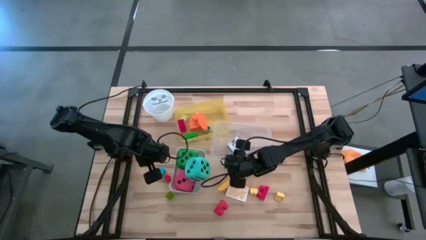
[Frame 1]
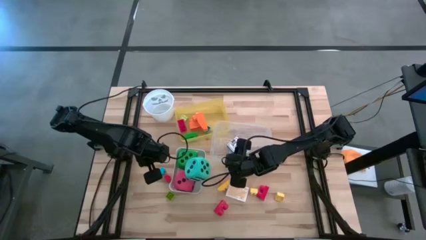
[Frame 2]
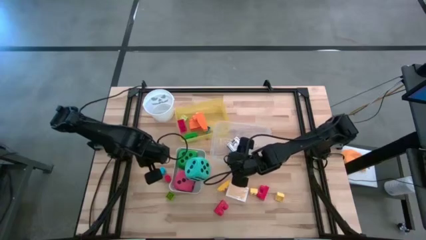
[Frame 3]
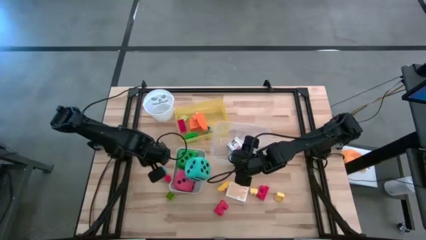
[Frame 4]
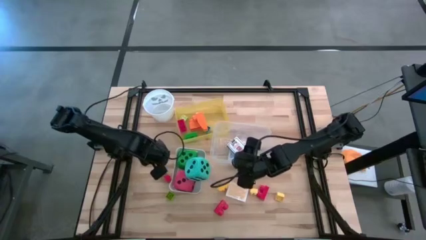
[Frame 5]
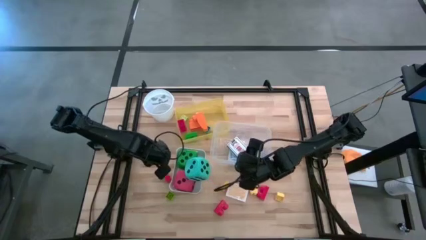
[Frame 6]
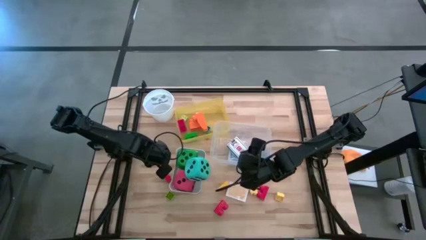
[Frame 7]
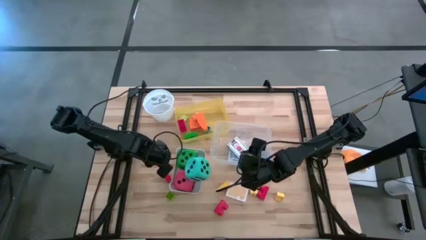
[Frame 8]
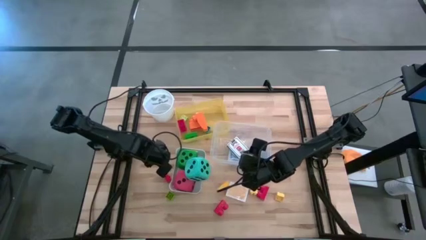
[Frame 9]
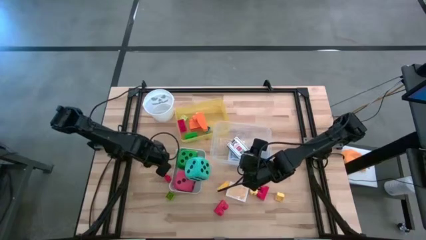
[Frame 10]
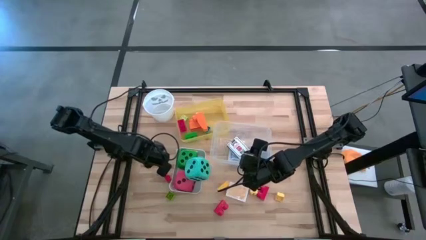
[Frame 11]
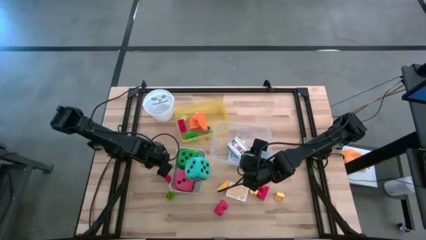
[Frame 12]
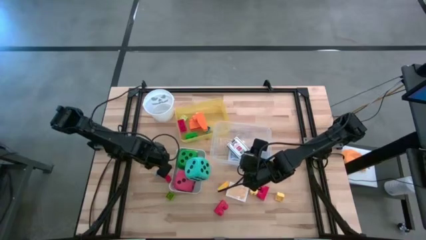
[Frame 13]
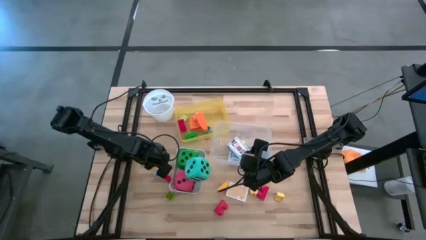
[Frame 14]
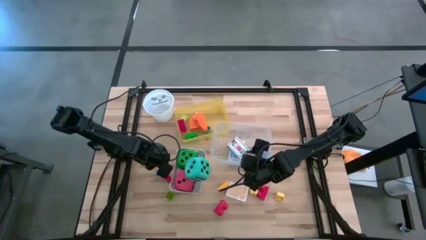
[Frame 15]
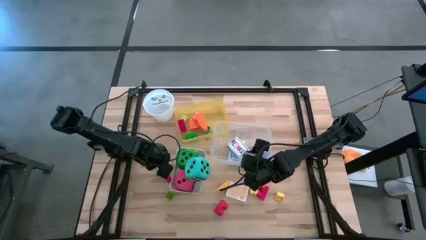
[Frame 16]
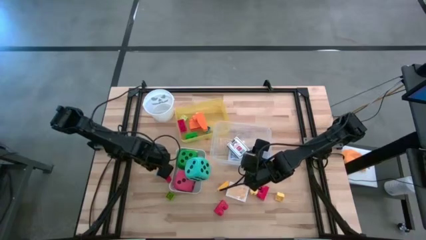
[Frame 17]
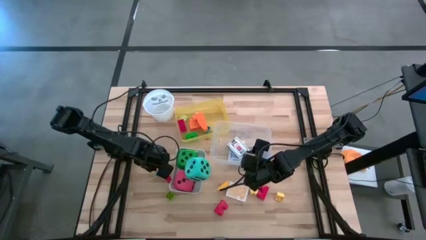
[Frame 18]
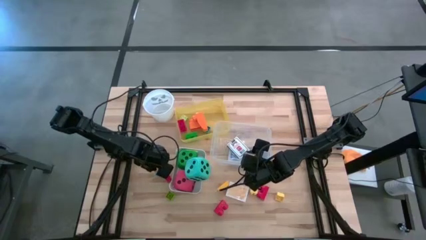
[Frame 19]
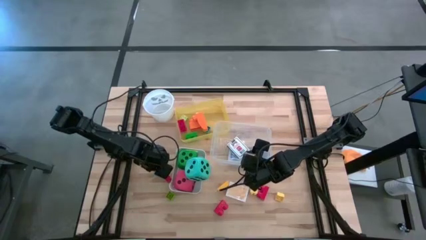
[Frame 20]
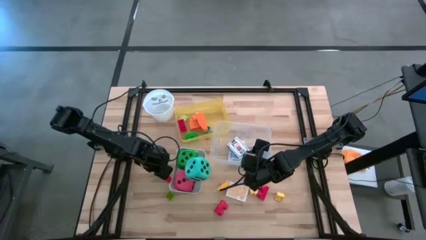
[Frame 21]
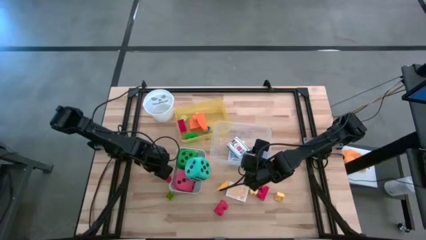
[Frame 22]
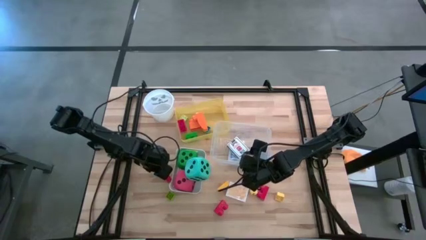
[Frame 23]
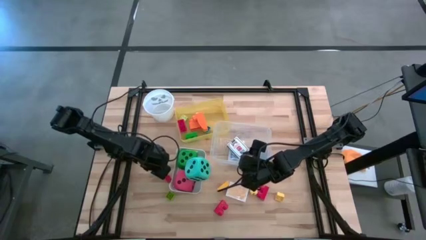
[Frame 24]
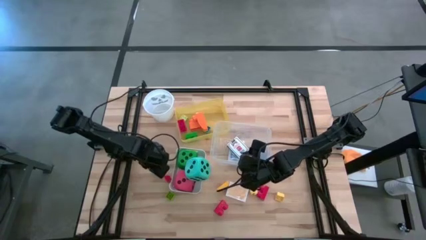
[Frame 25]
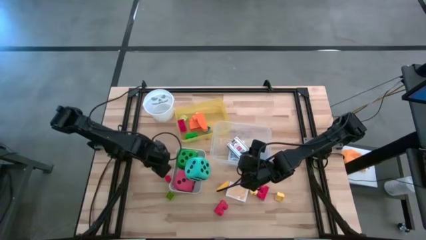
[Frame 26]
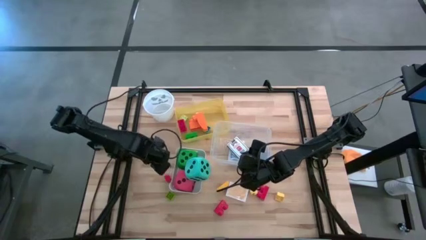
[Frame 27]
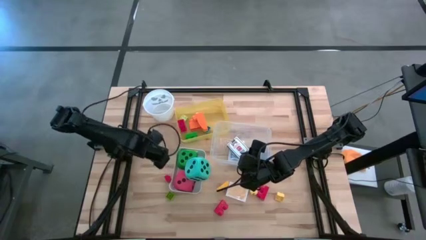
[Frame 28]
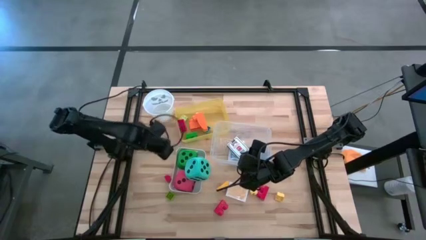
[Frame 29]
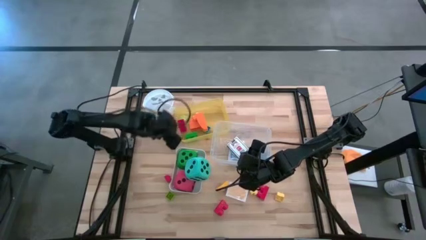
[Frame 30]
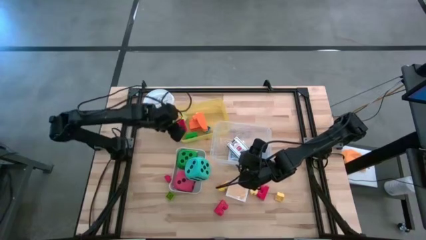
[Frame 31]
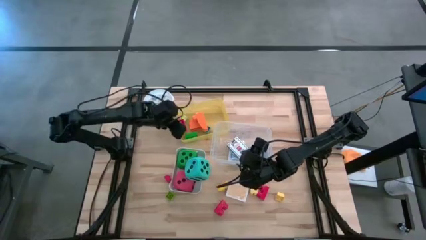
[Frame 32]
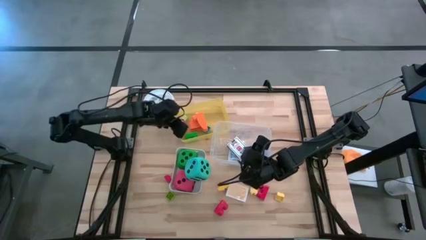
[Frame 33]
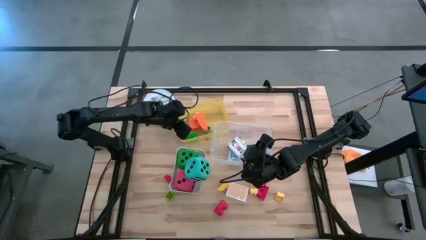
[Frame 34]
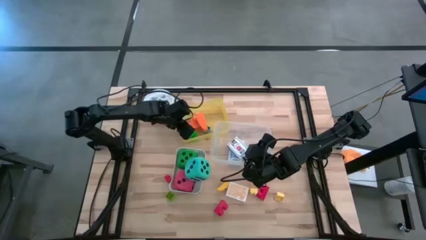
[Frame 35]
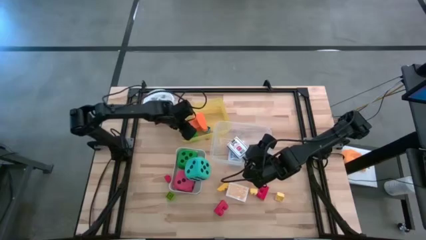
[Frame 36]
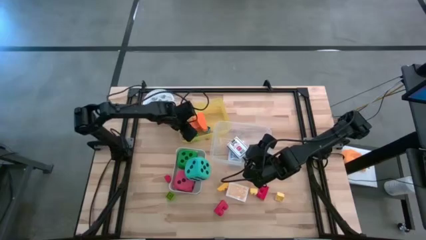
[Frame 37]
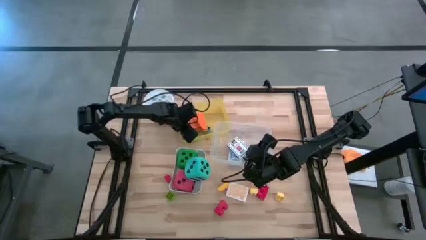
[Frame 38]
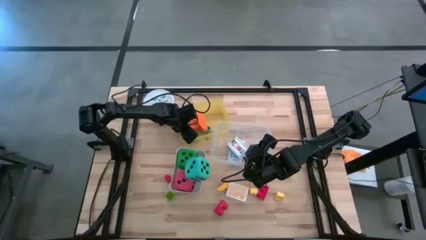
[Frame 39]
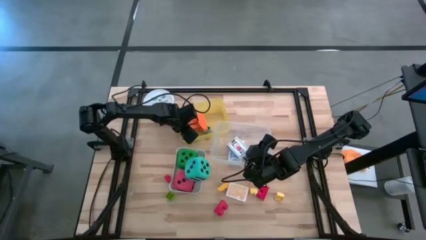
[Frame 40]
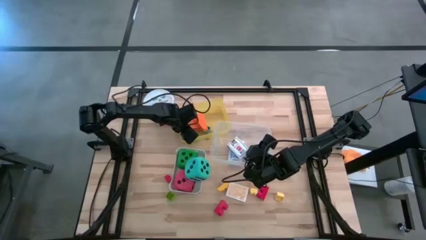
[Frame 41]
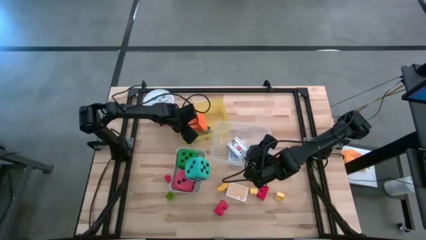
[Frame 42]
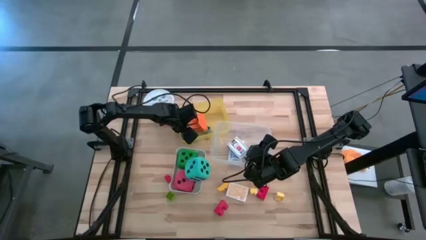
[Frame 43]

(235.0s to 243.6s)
Task: Pick & Place Toys
Put the blue game piece into the yellow bin

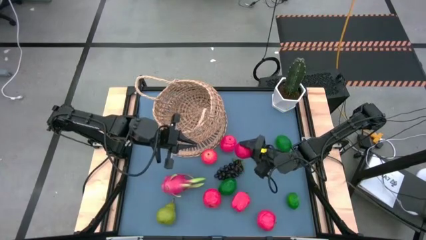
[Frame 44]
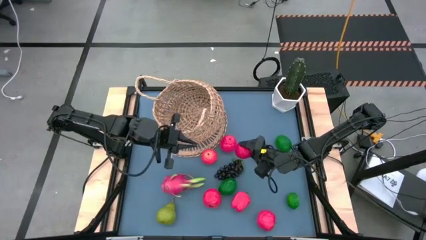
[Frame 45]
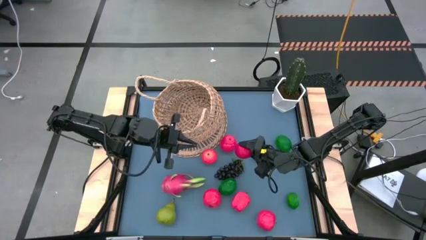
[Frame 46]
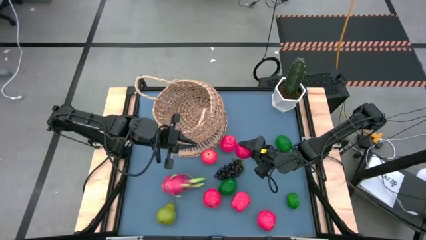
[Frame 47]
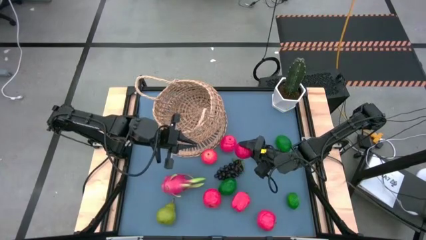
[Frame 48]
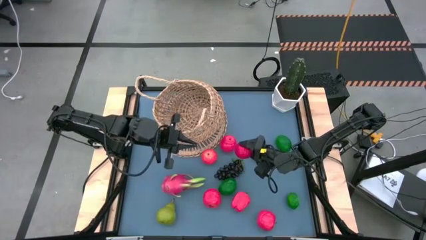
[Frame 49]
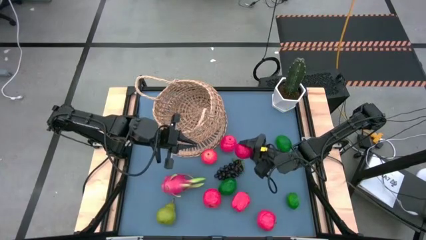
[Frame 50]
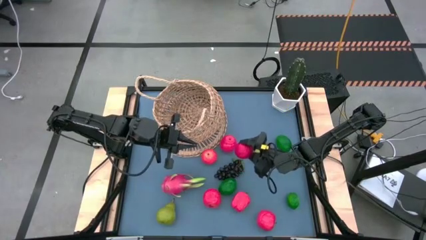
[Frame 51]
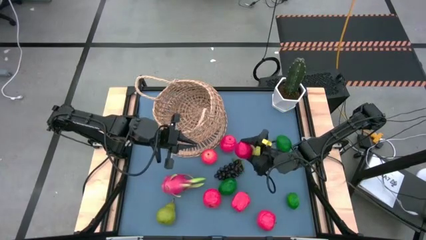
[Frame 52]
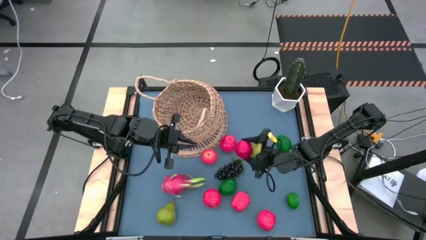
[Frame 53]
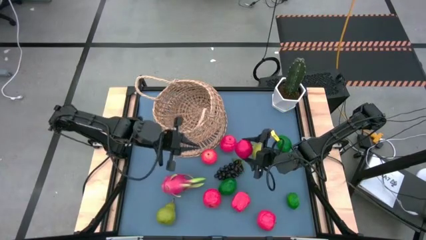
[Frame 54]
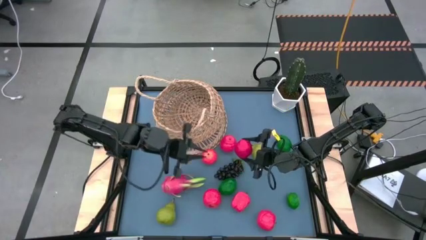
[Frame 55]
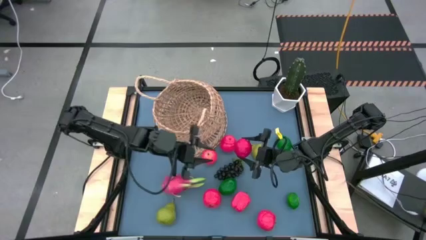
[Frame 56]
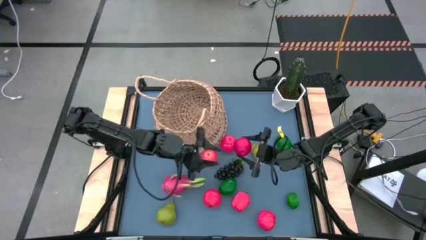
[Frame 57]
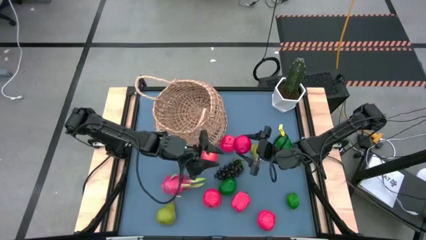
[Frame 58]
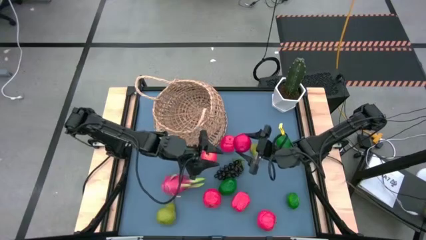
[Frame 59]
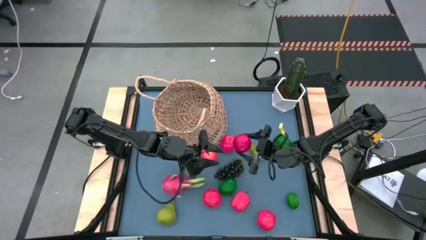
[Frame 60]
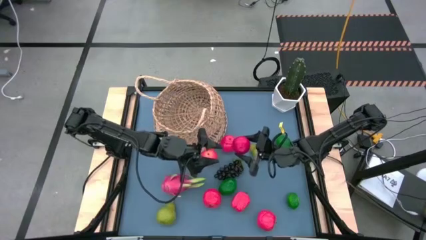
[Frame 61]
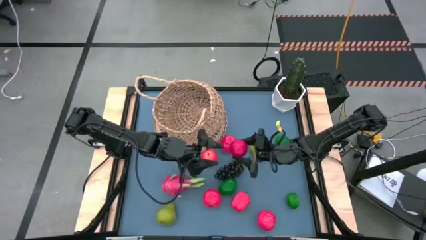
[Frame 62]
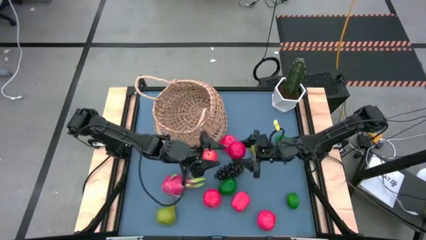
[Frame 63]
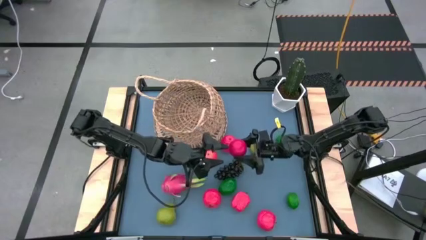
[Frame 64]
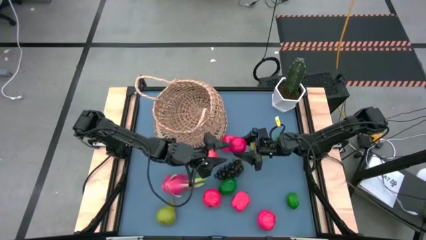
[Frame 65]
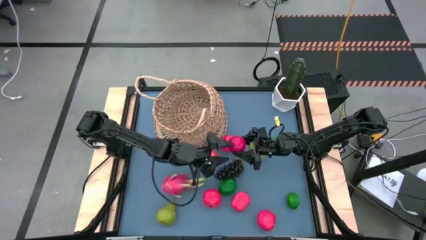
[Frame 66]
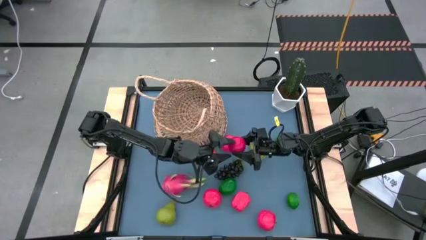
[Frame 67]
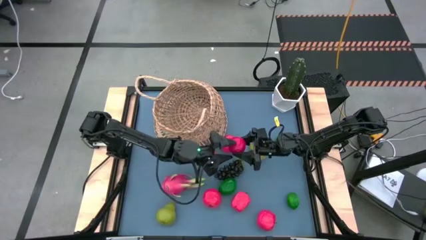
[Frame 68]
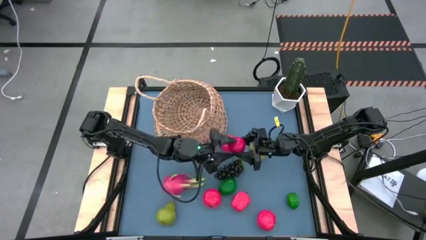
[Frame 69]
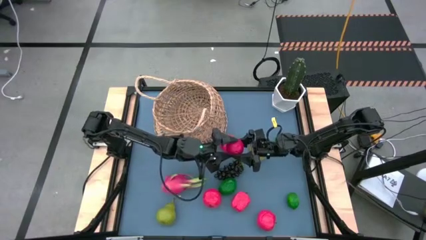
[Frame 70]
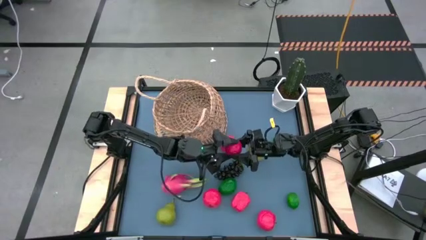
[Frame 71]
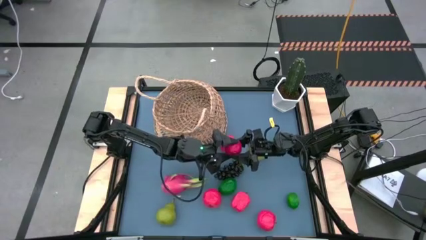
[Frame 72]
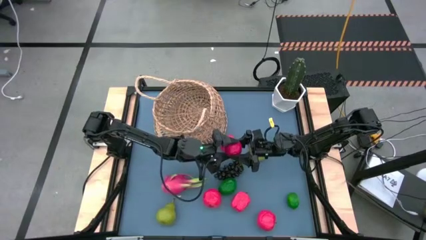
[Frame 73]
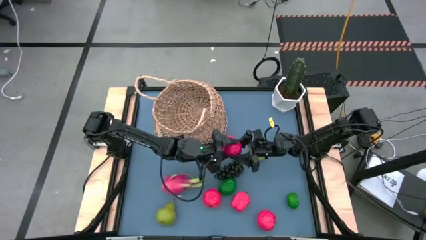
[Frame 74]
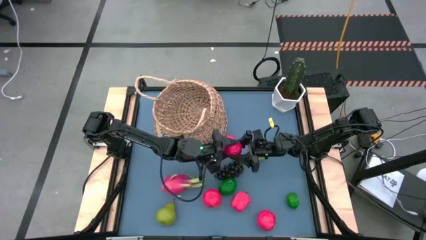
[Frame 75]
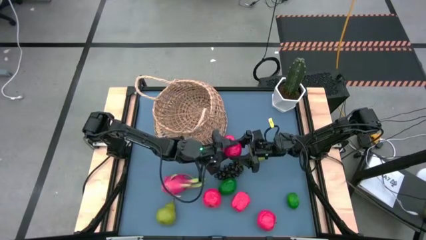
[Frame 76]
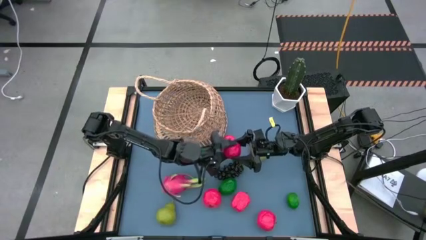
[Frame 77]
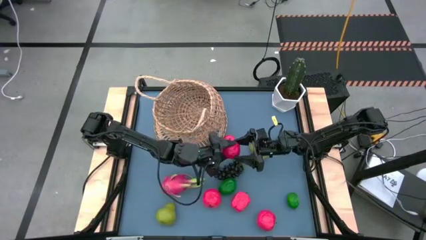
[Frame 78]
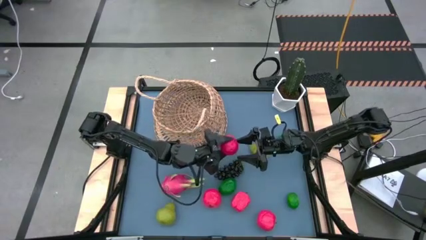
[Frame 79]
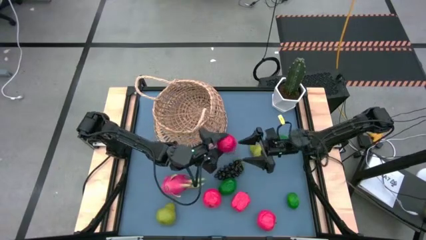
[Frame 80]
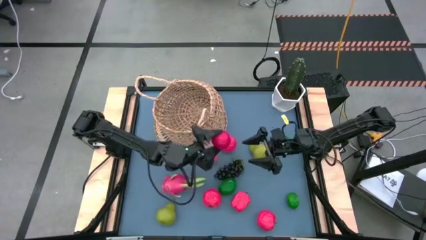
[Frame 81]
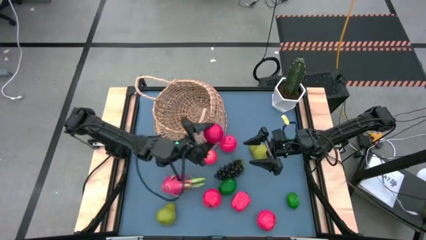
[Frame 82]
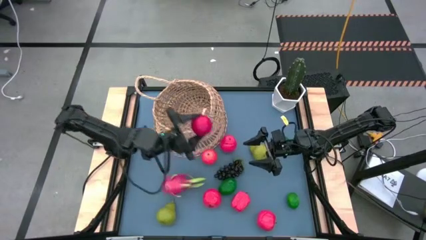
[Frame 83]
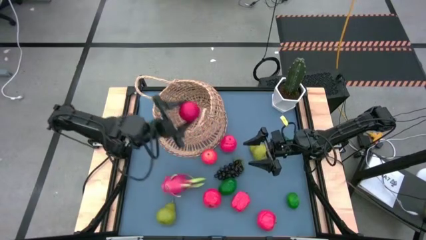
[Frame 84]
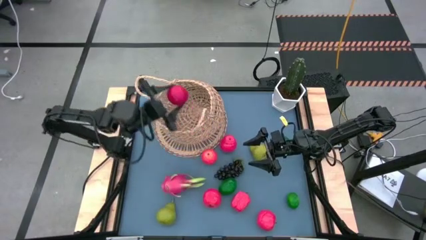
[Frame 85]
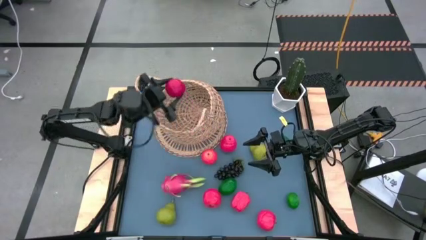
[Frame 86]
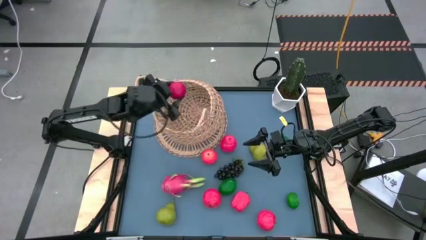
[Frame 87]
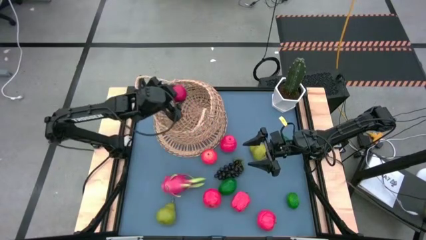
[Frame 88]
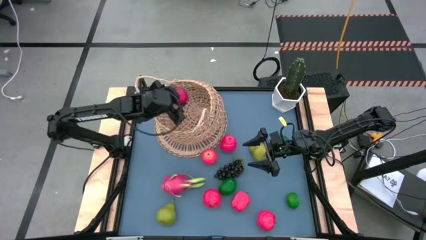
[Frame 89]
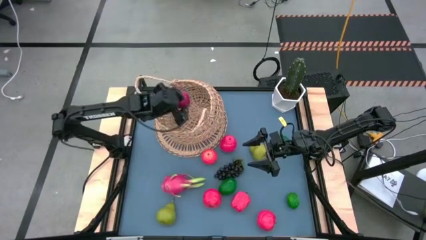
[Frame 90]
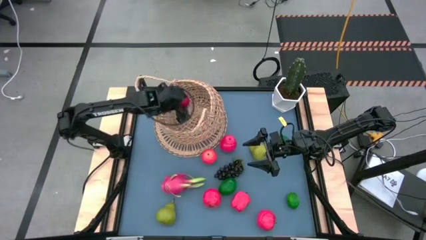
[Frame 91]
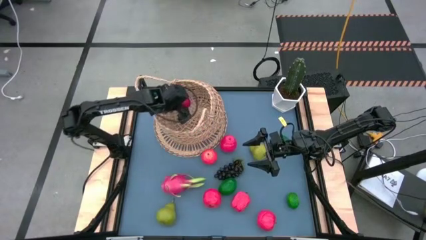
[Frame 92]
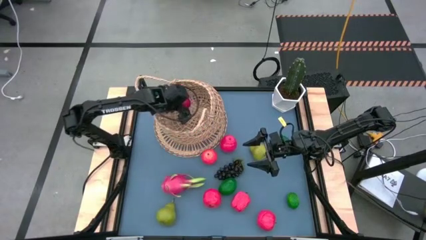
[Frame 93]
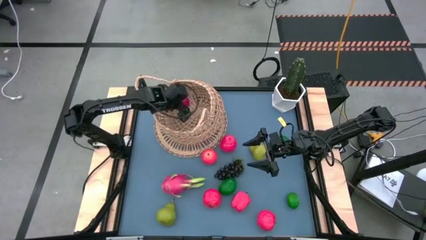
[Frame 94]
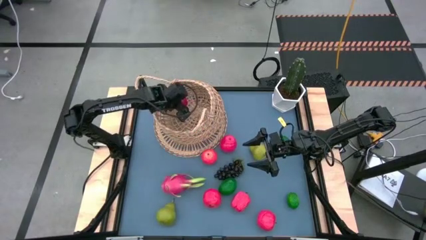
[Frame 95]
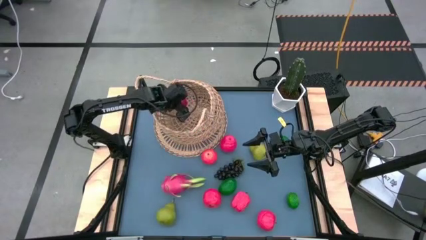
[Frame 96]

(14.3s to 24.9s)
Task: Build produce basket
Put the red tomato into the basket
